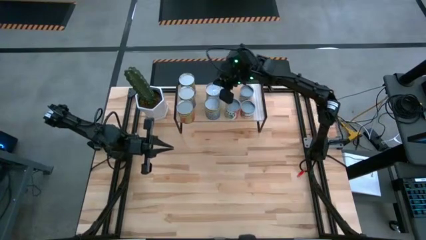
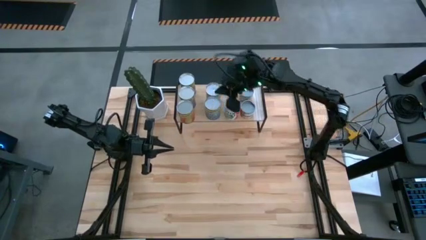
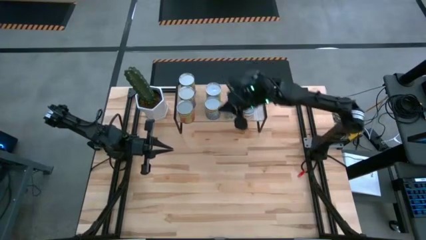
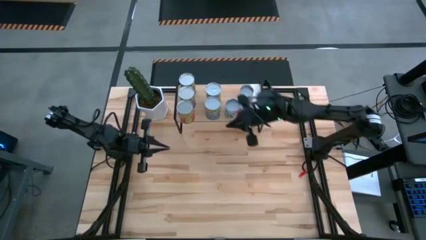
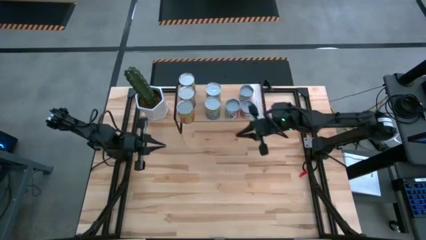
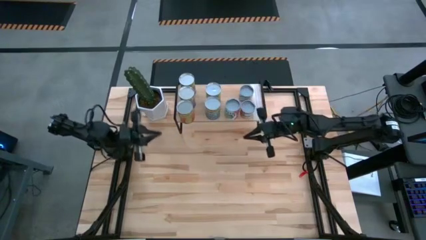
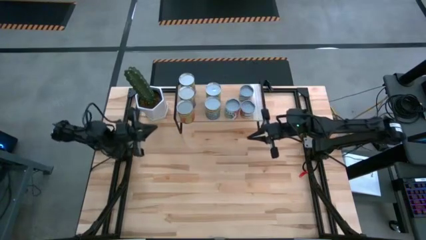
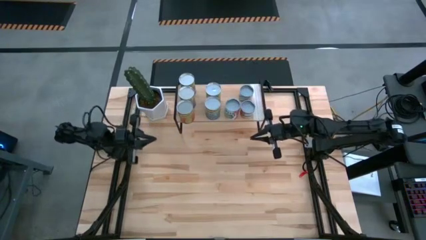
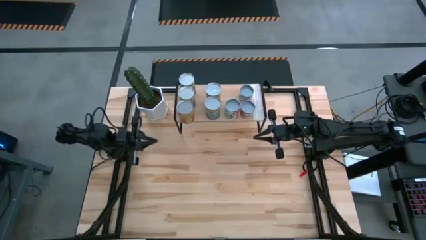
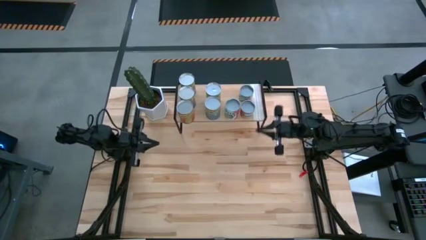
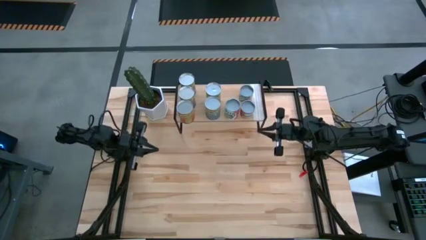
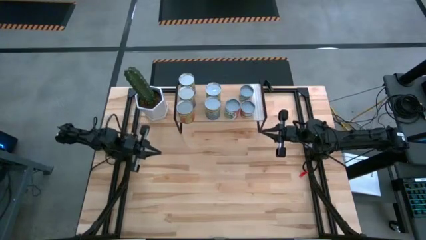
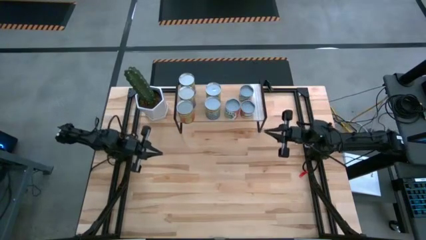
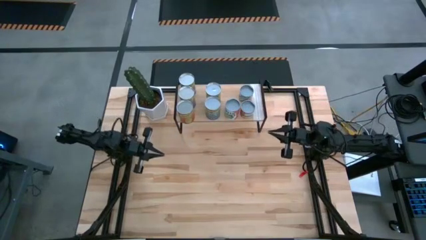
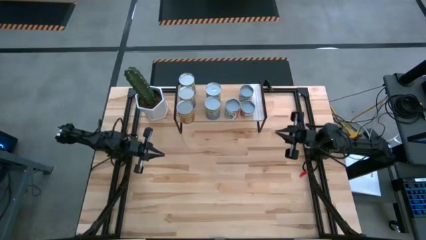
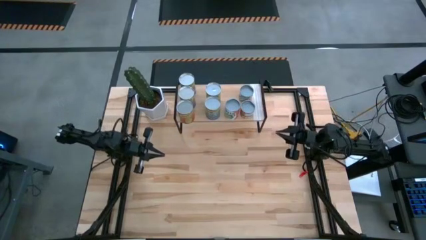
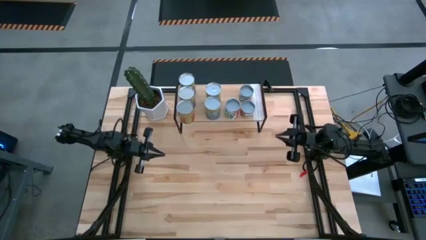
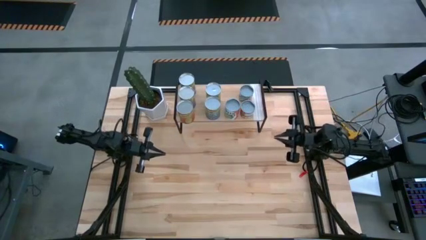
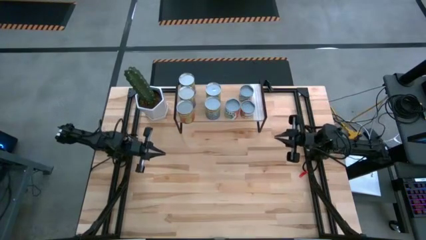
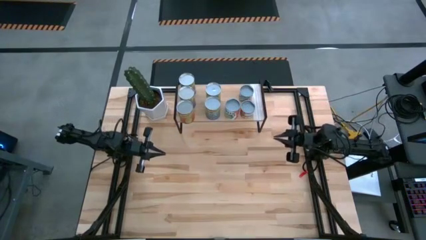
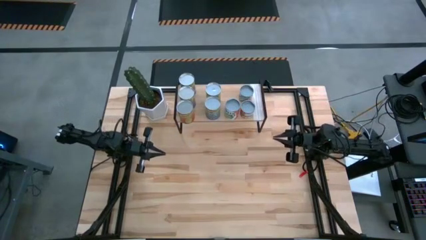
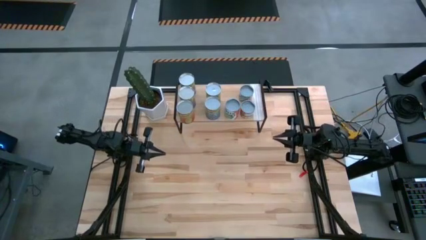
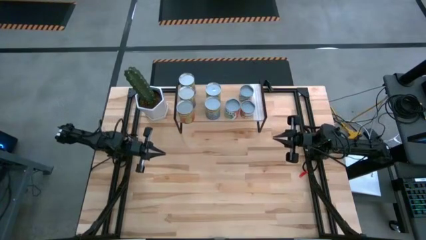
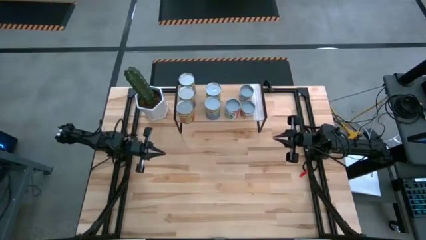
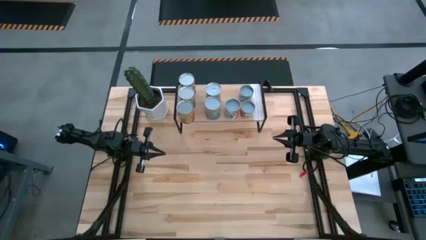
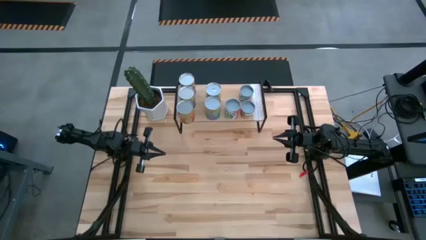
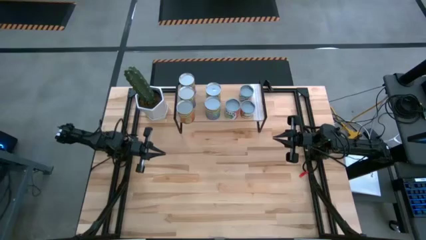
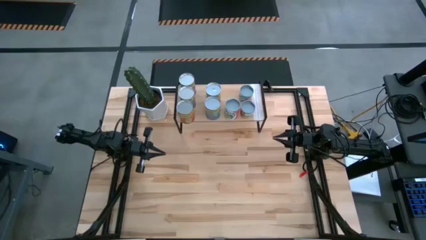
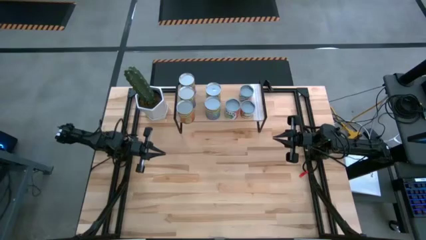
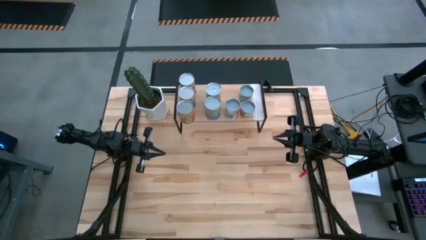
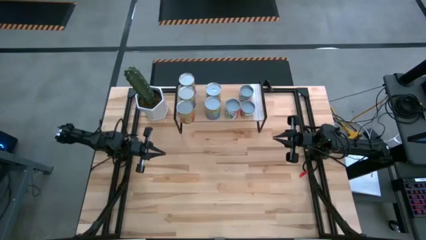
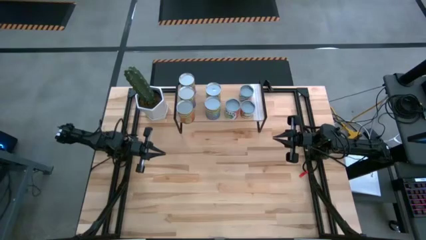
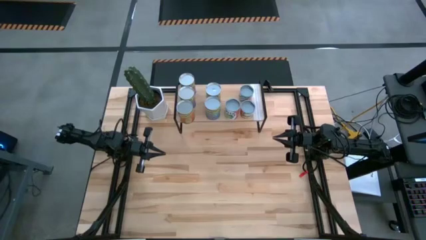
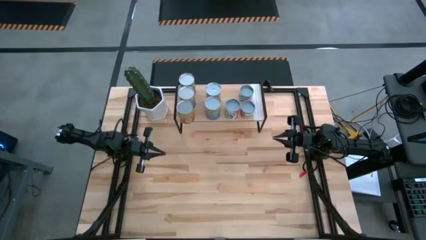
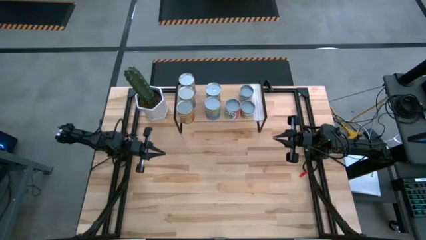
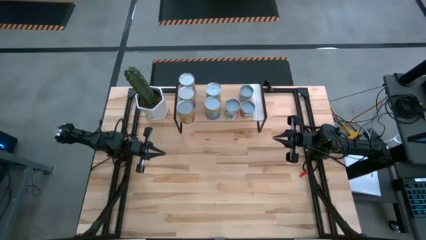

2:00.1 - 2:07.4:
Task: Pick and place cans onto a shelf
Return to Home Position

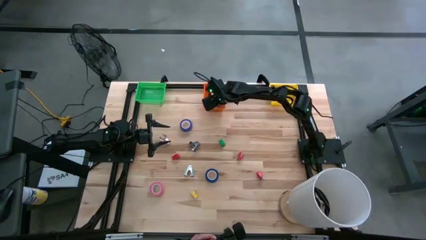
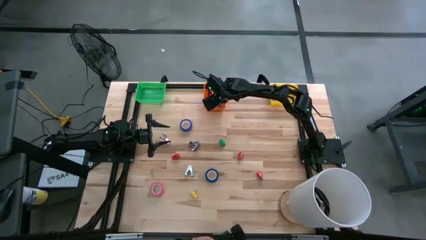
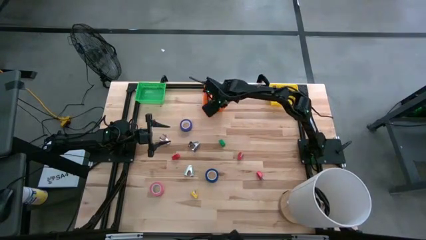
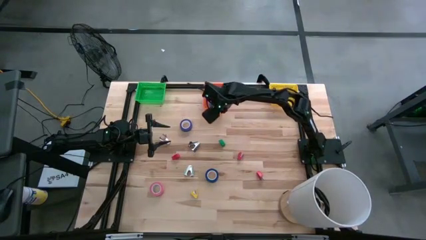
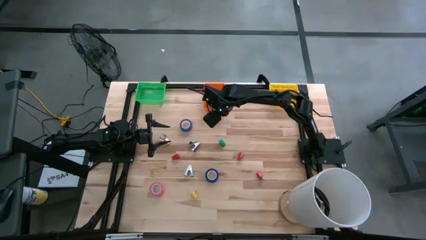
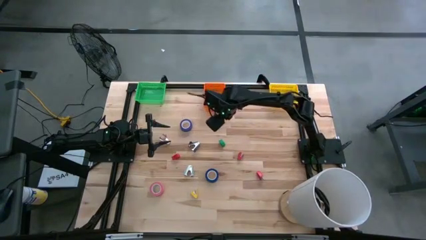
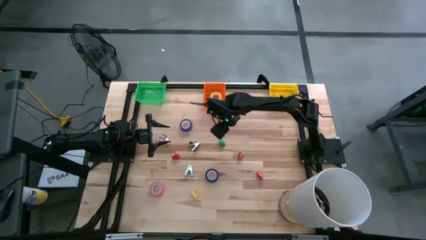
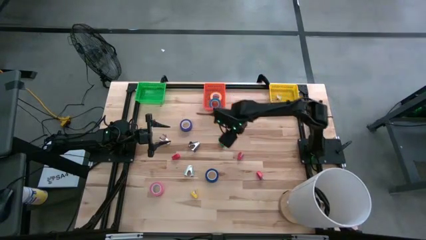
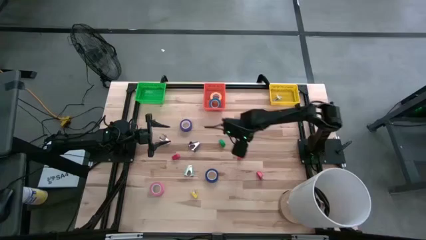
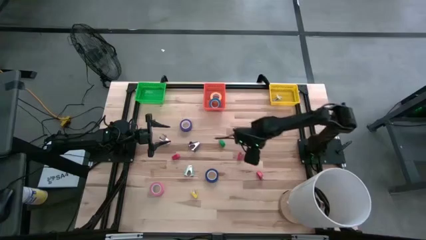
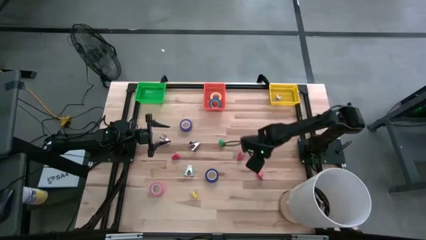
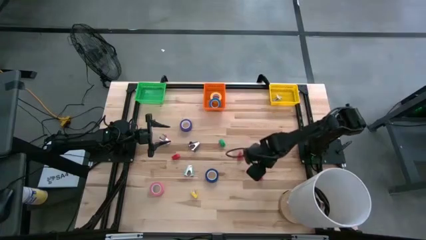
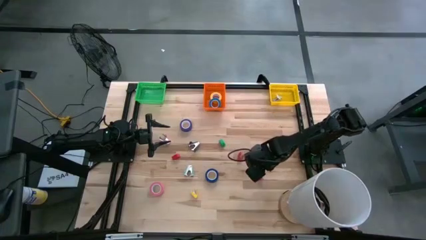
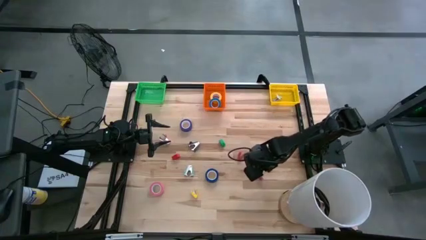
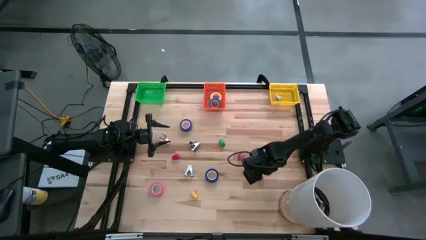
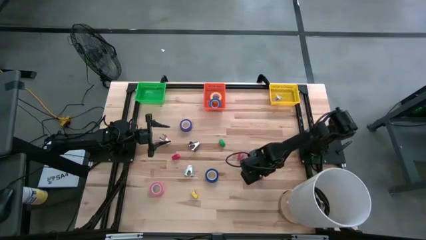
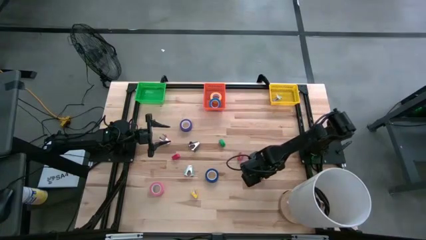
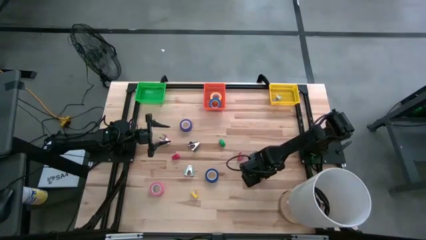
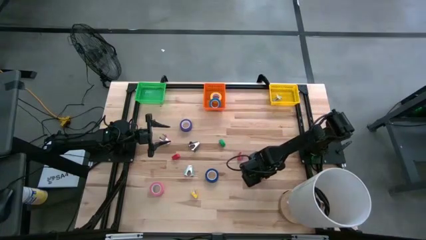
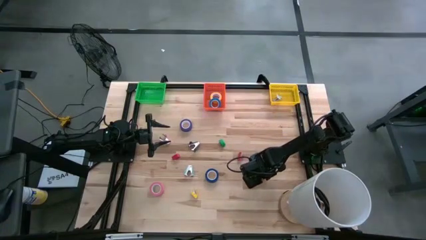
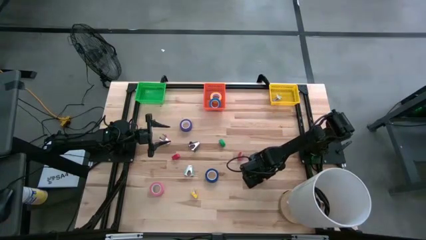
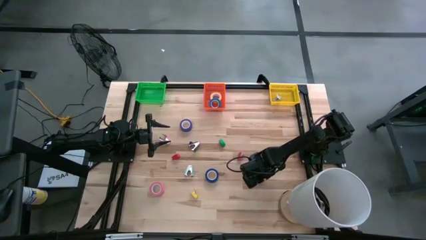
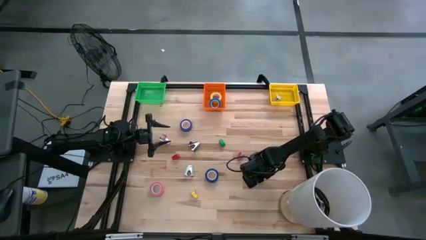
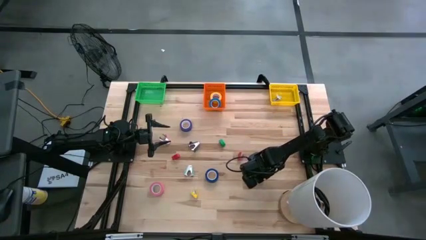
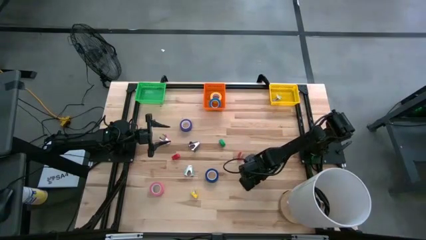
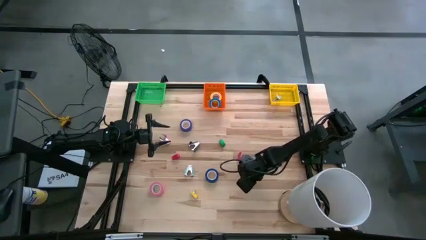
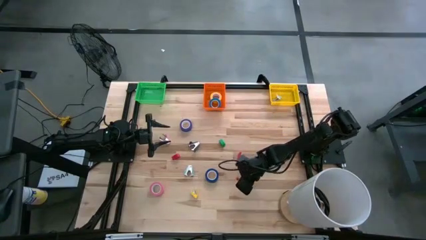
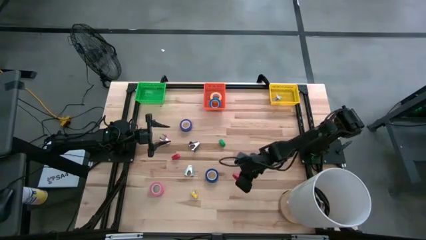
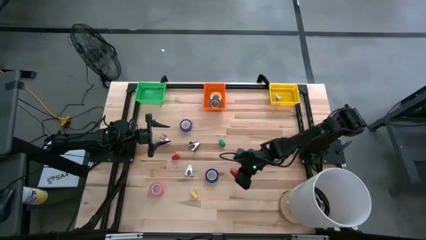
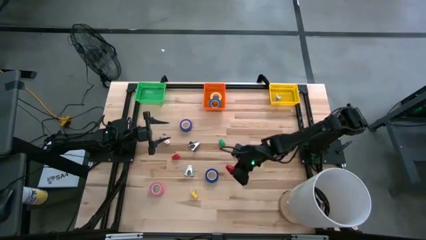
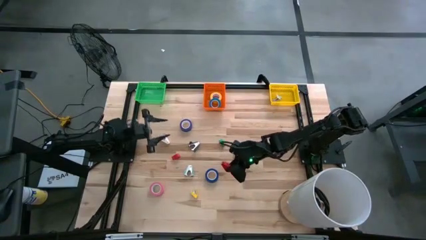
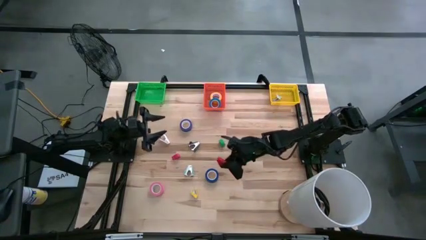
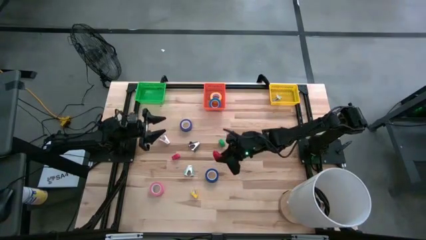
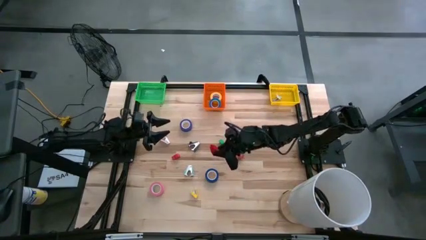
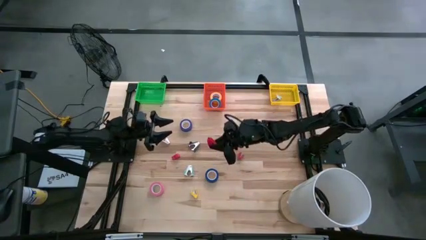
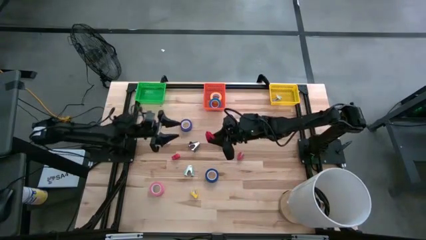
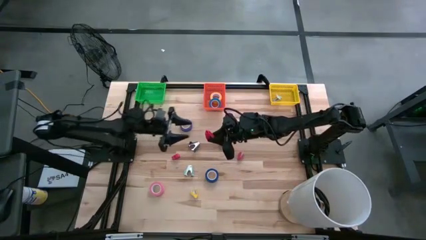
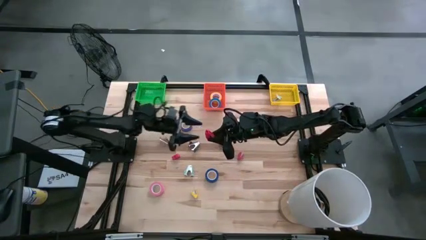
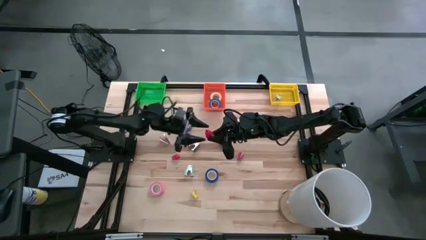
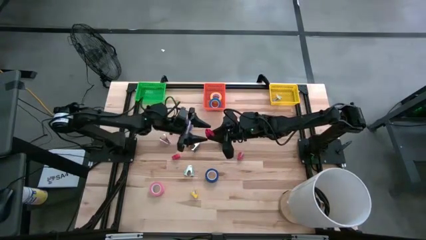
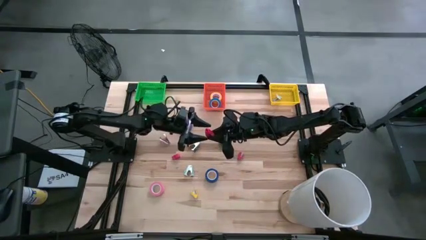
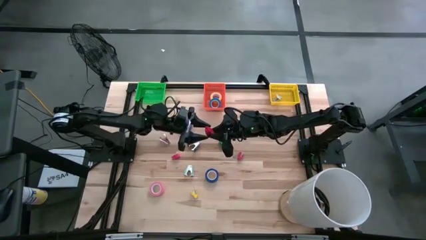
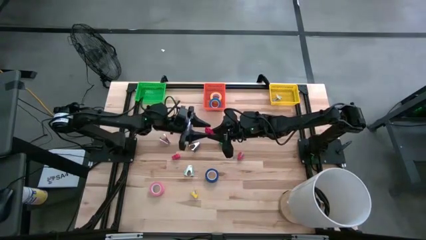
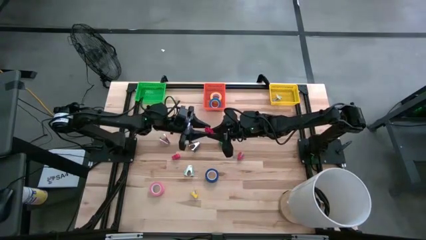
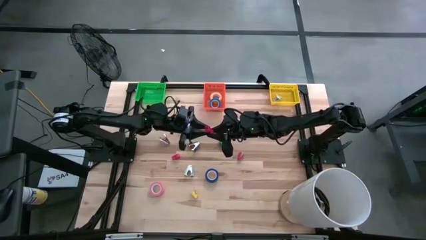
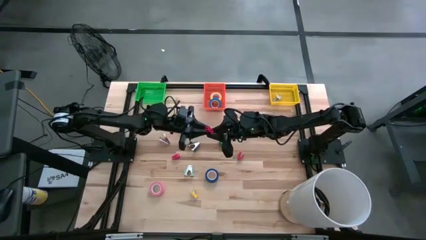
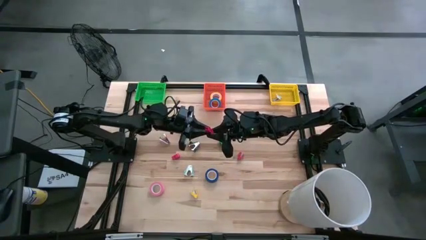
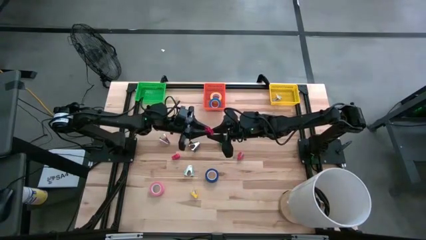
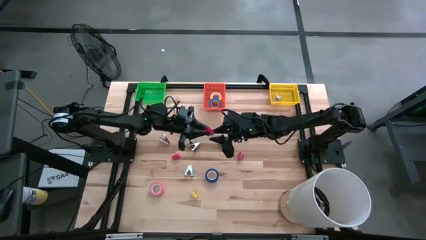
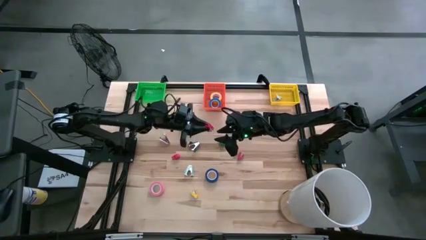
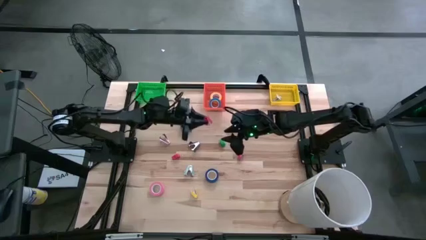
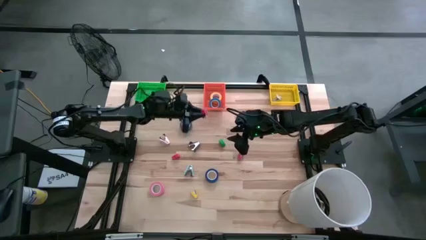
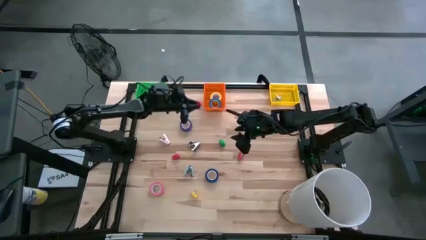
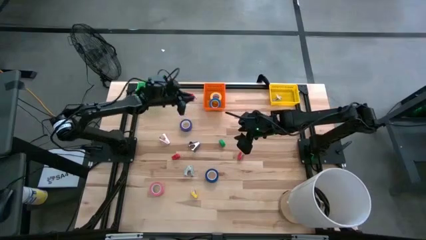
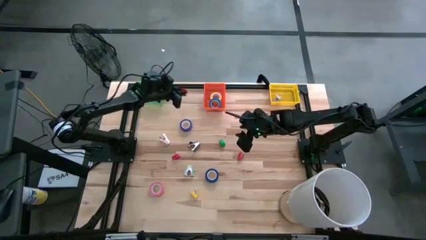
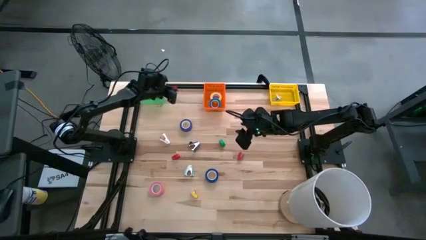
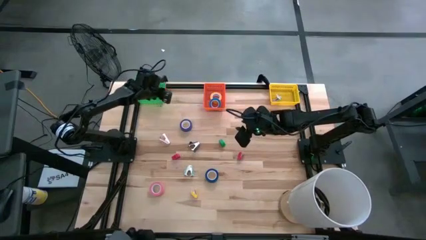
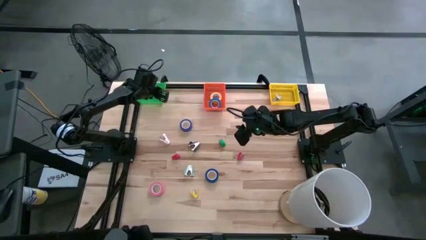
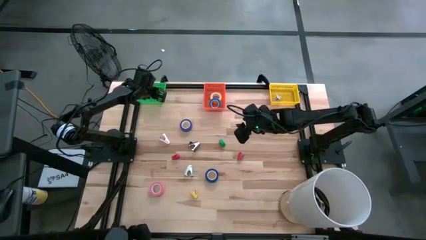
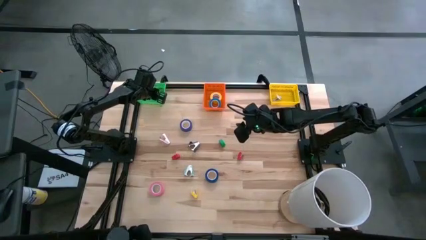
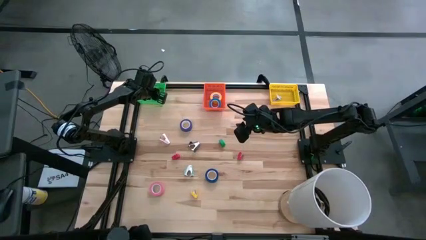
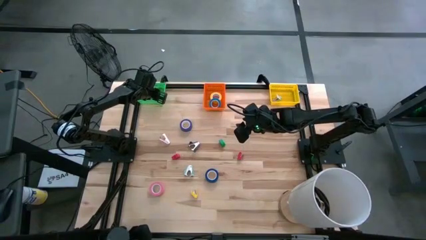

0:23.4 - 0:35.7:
Task: Pick and place Stapler, Stapler remover, tape
Put the bottom right red stapler into the green bin
